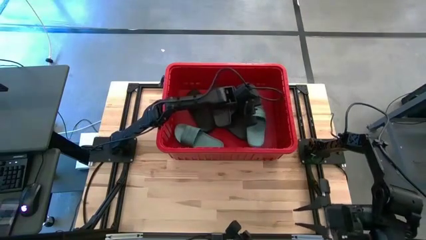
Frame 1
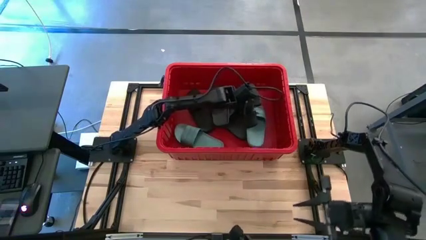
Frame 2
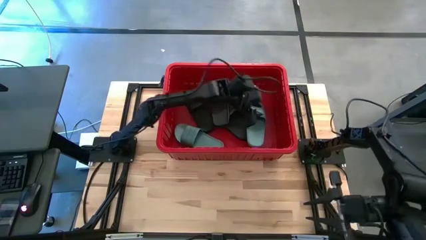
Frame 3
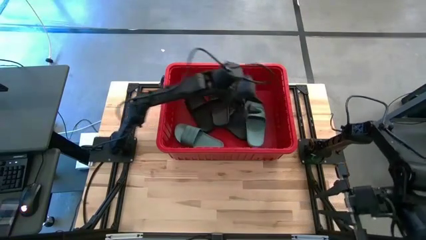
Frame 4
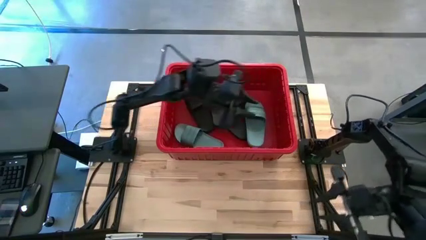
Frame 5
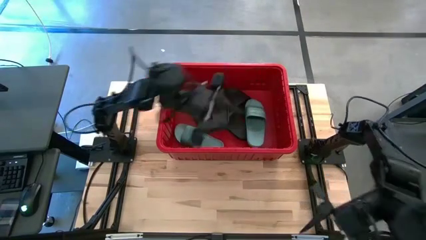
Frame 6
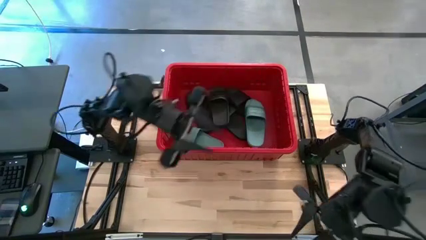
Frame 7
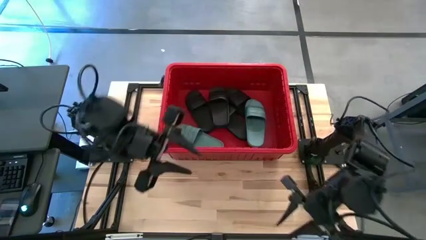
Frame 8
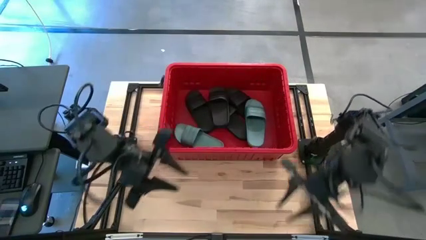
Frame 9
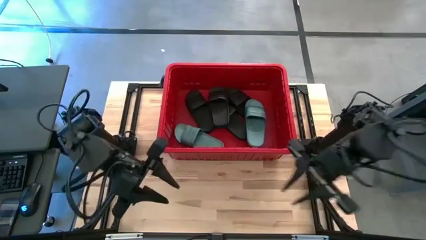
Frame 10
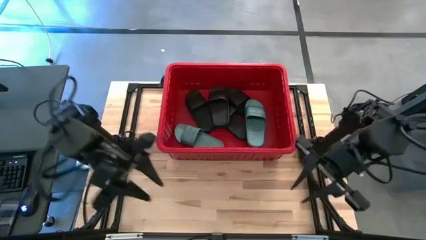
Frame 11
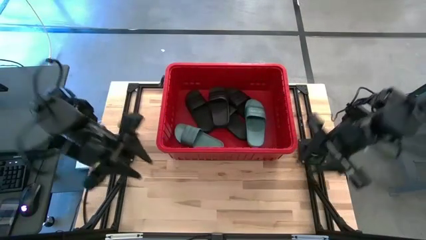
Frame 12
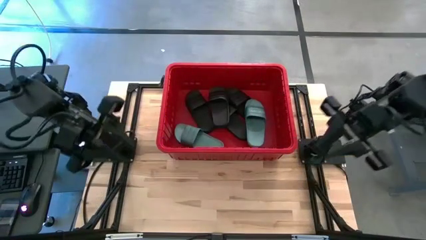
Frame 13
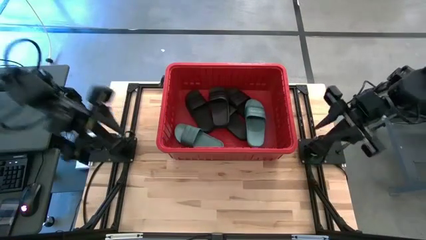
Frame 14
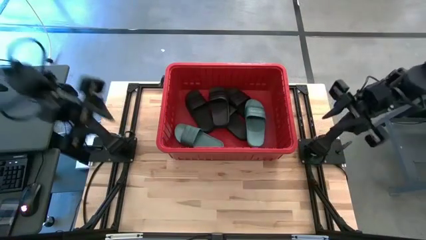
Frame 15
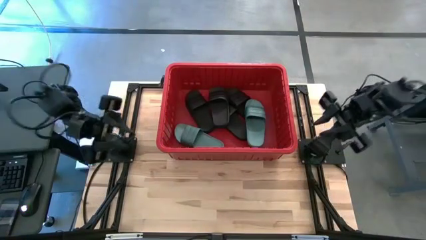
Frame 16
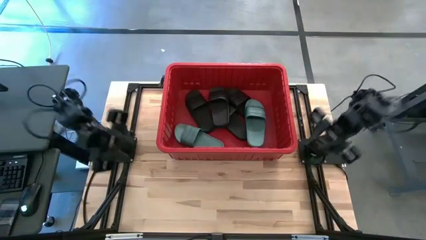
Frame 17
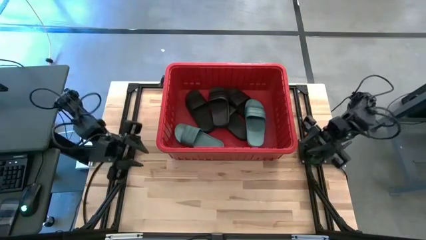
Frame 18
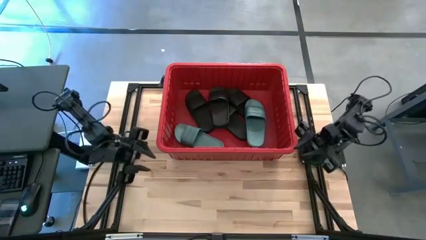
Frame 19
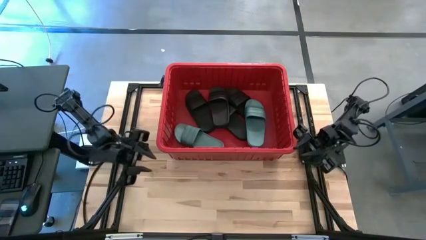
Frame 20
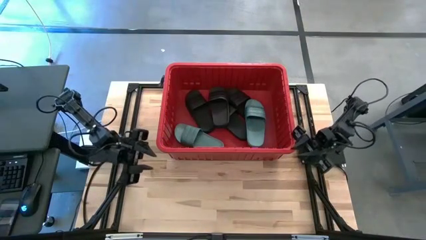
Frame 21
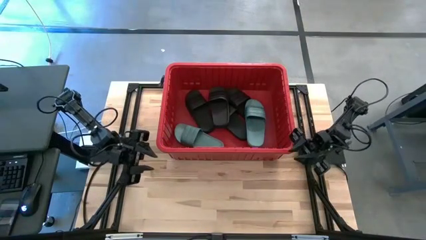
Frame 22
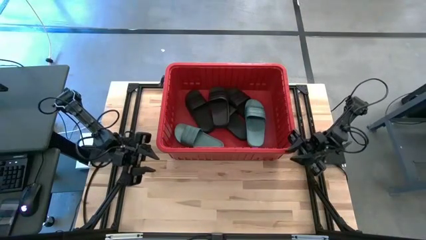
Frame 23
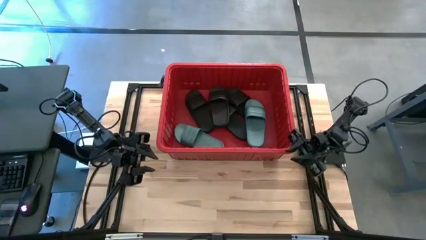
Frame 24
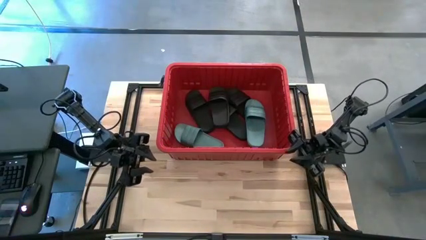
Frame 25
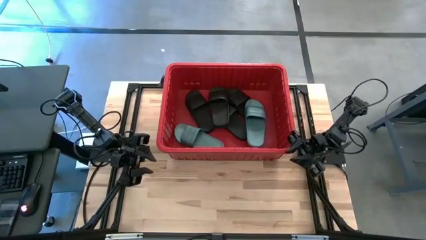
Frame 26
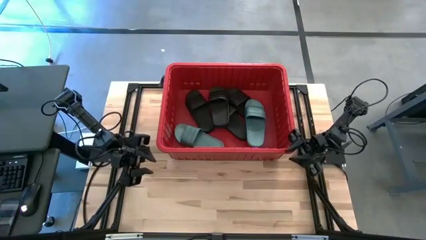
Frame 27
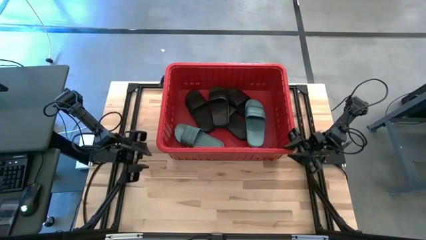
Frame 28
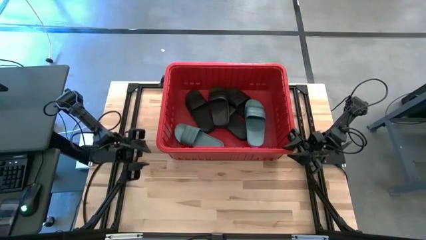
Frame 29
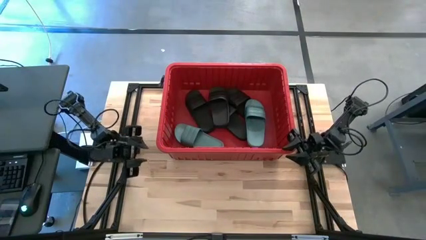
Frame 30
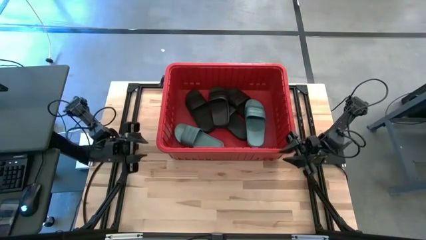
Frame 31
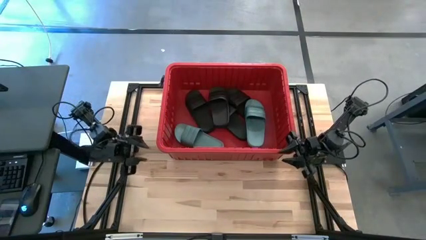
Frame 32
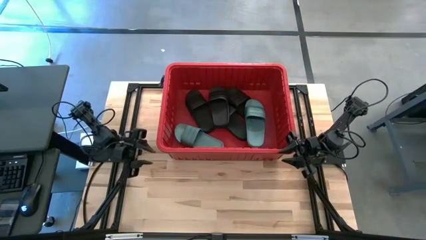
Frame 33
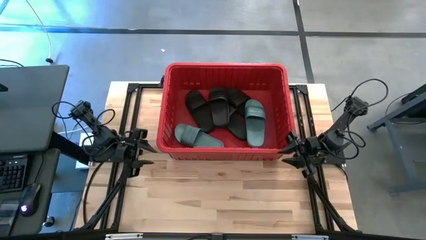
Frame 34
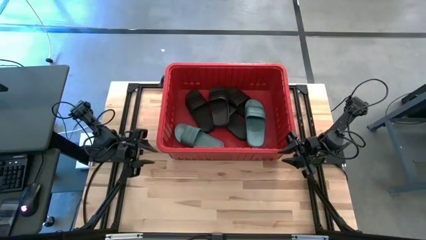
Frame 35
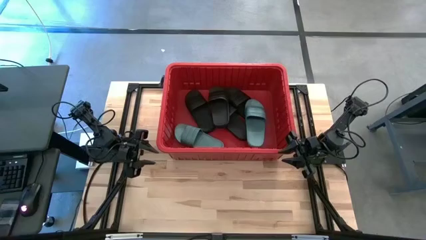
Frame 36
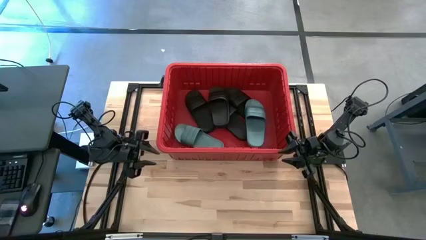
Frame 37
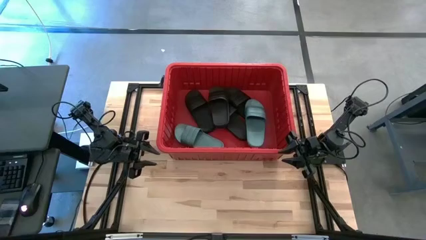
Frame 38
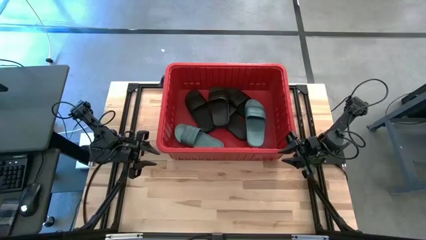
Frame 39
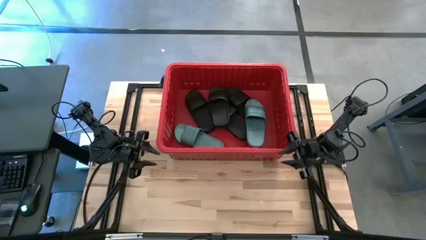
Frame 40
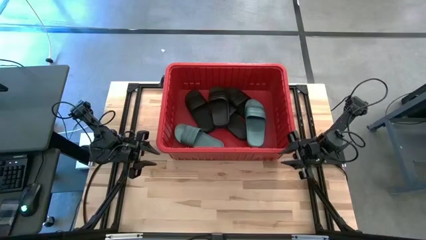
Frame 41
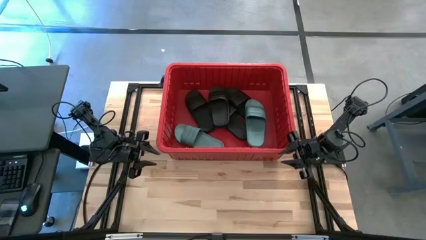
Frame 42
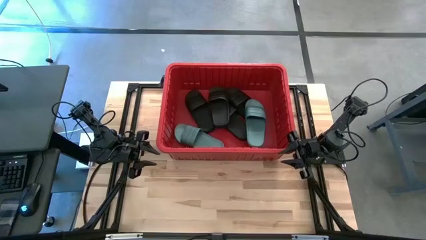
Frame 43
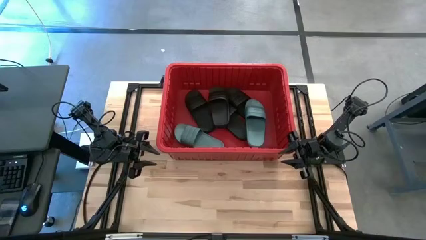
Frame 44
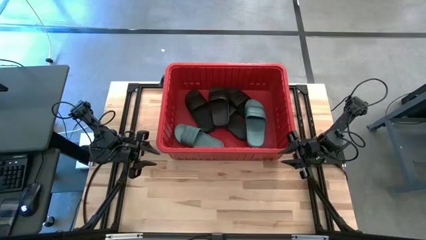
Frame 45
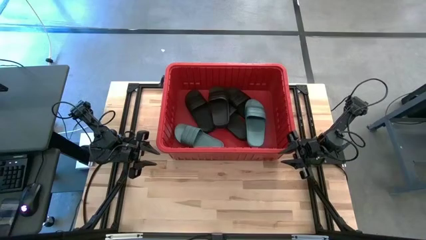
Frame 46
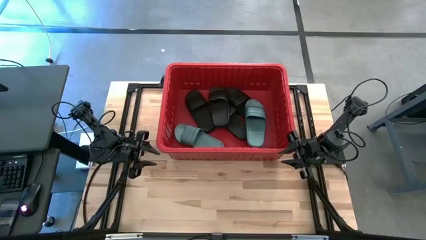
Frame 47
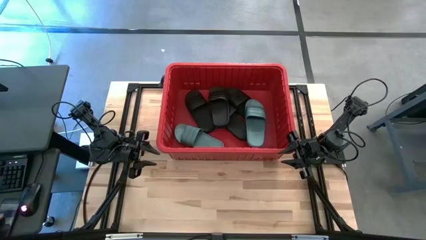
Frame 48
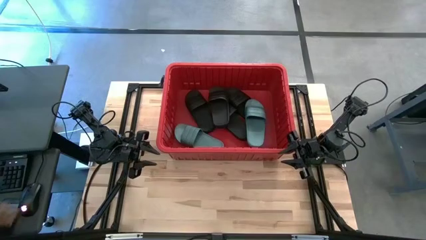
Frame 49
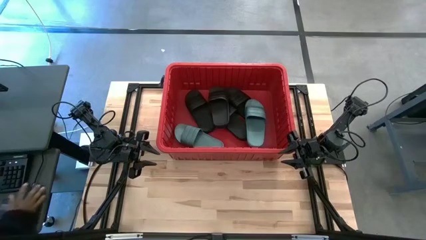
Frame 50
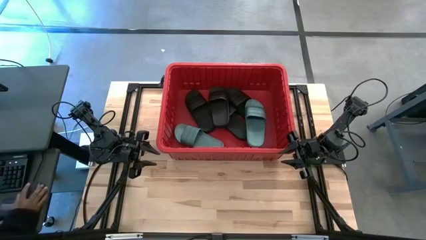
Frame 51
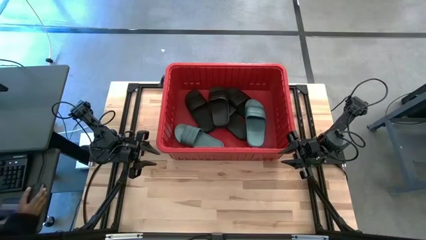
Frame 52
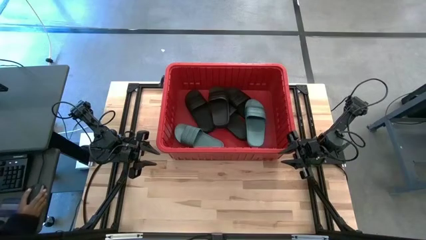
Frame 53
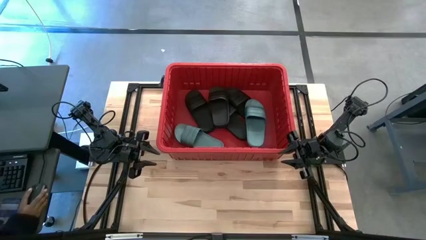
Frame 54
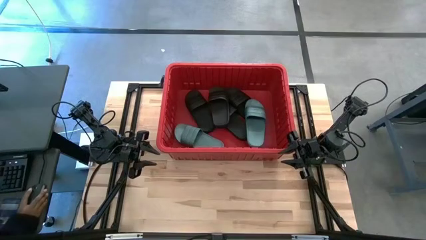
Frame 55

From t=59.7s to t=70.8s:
Task: Pick and place slides into bin
Return to Home Position

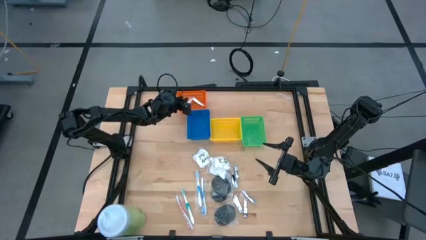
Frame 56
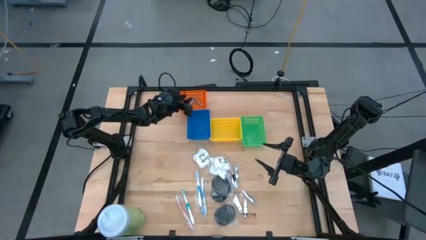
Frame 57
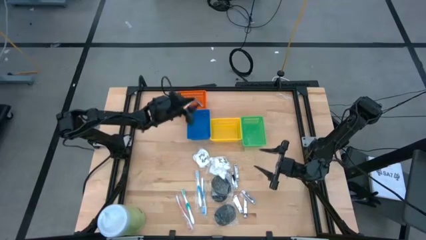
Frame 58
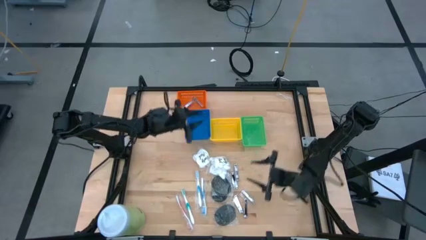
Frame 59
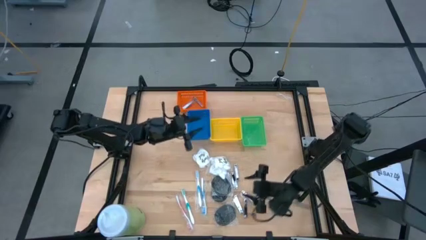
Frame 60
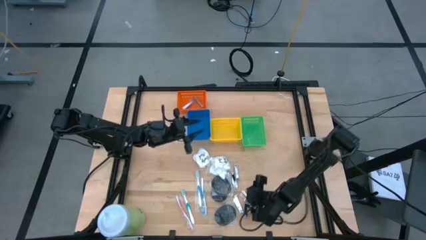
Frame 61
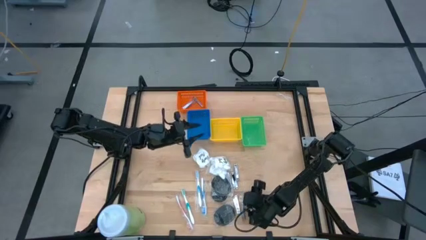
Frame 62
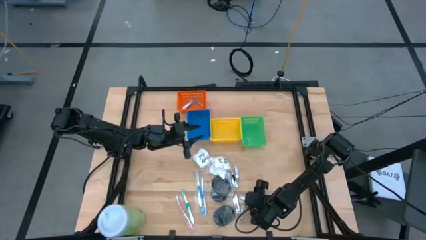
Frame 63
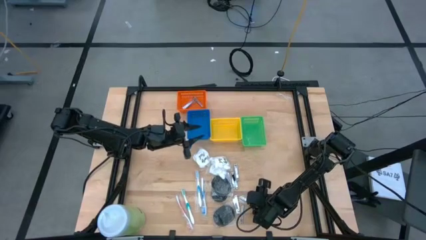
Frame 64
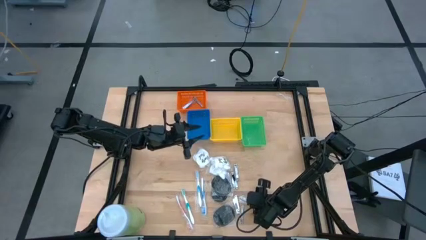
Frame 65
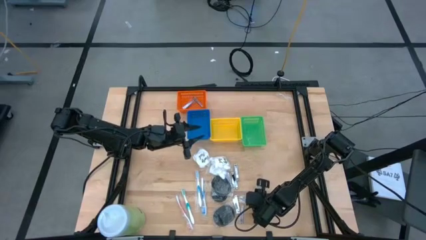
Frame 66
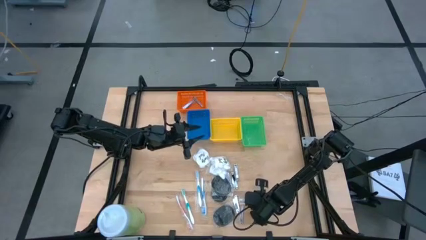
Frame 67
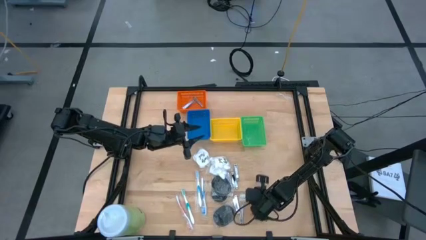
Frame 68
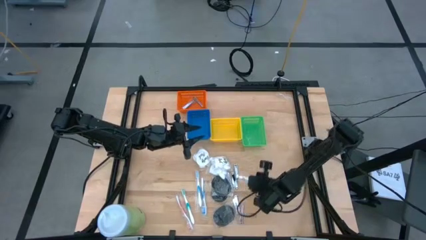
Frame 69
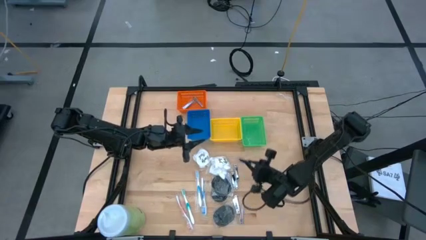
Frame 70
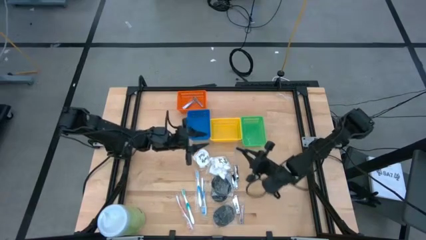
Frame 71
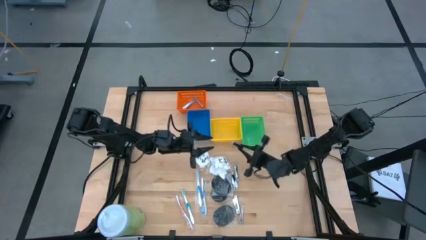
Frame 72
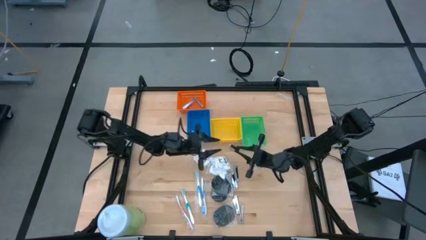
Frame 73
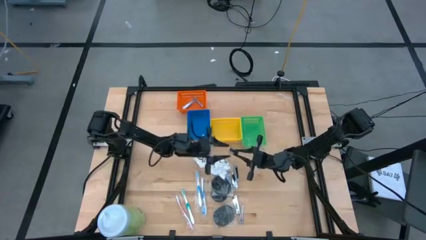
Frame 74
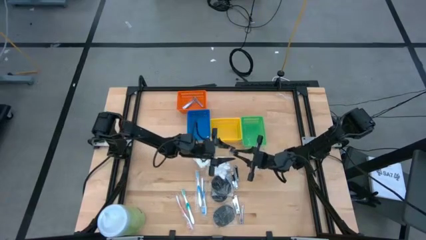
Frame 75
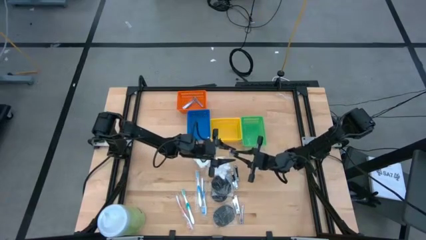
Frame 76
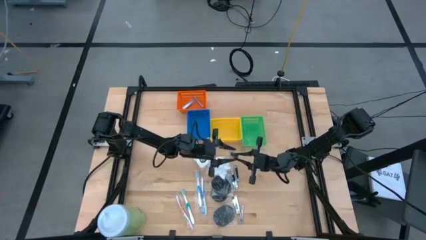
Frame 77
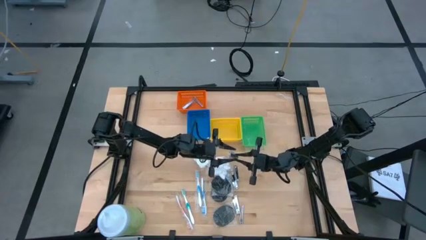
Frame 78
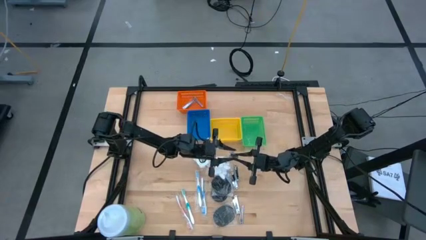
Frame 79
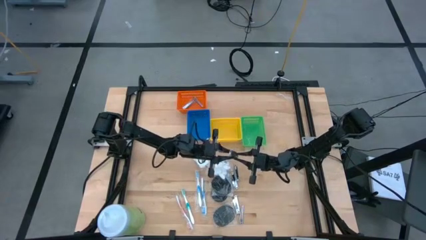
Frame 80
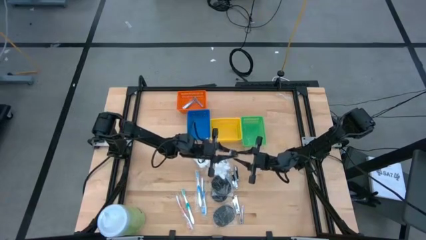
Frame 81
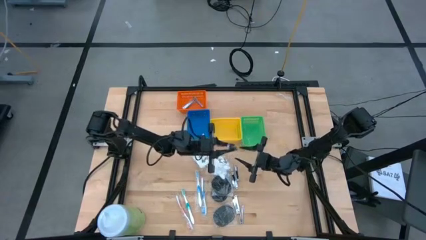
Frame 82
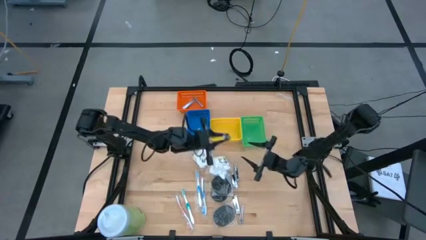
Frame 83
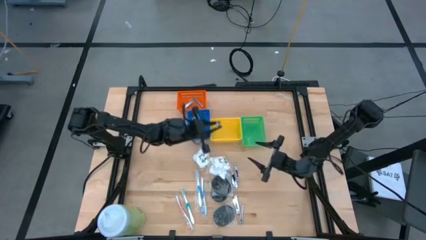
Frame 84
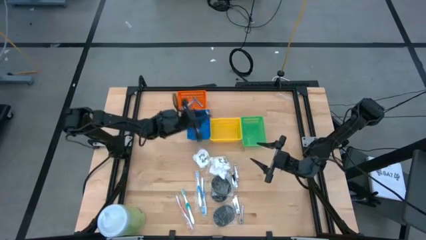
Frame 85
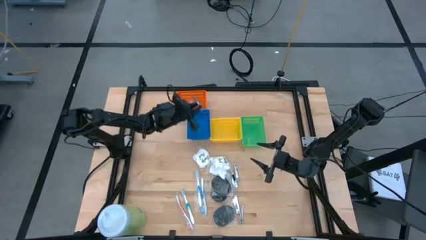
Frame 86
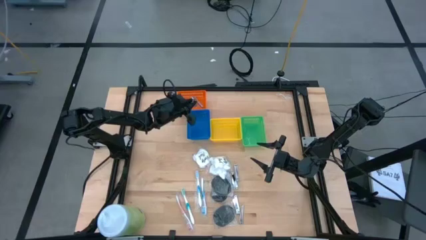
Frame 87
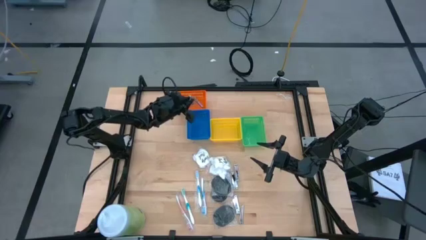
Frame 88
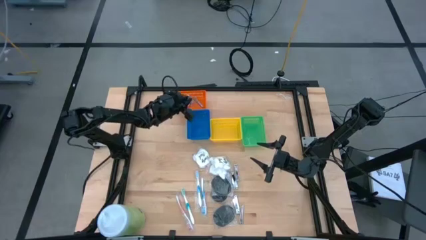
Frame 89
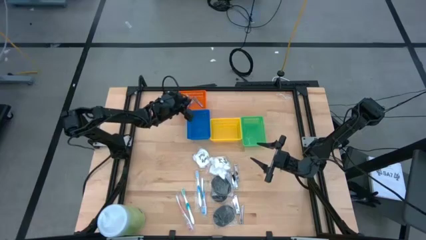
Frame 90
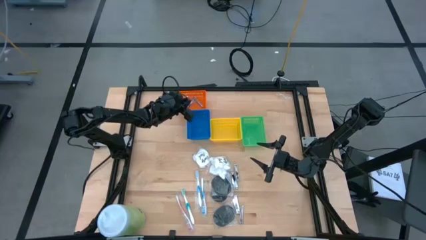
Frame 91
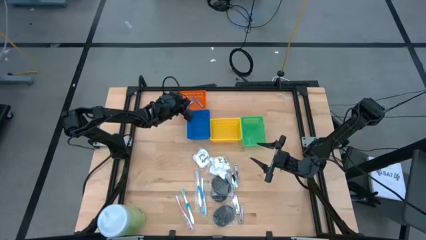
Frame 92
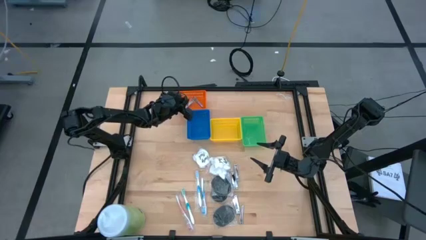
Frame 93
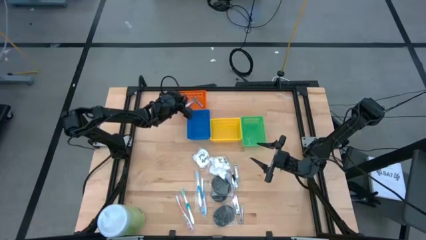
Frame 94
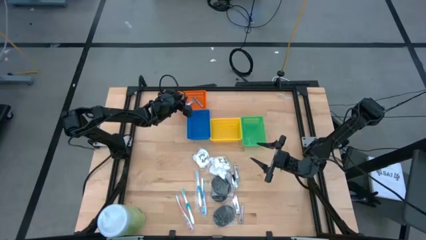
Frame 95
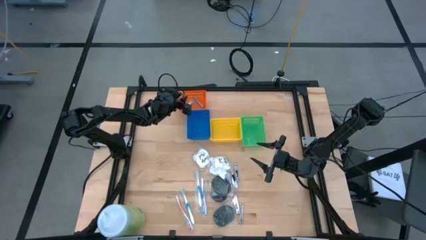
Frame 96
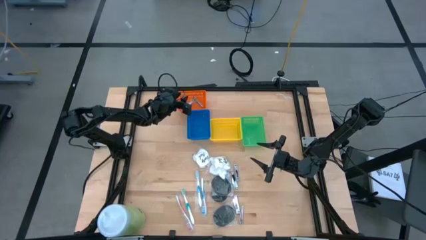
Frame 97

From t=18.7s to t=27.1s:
Task: Pick & Place Travel size toiletries
Put the nail cutter into the orange basket
